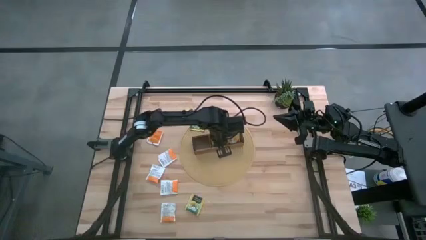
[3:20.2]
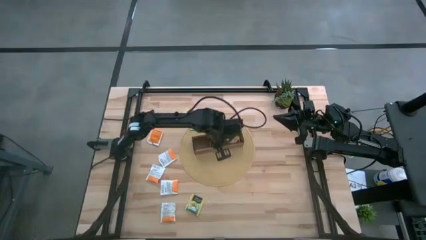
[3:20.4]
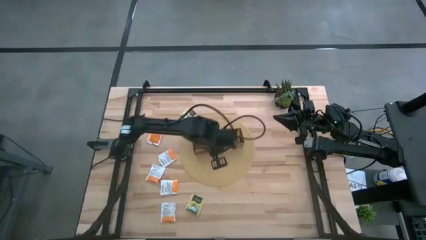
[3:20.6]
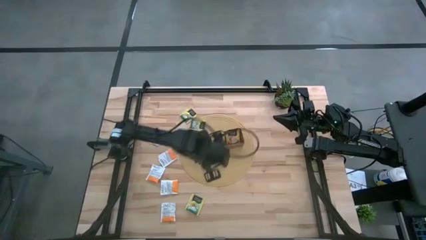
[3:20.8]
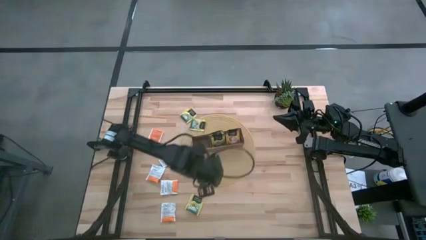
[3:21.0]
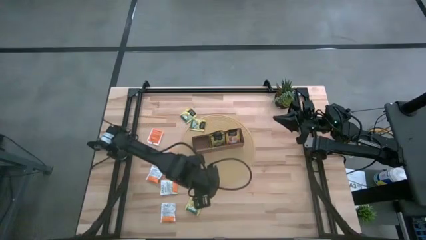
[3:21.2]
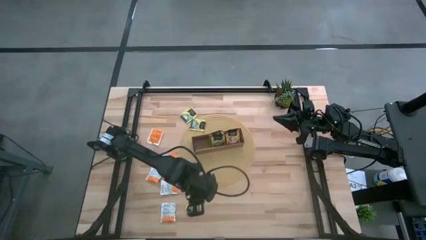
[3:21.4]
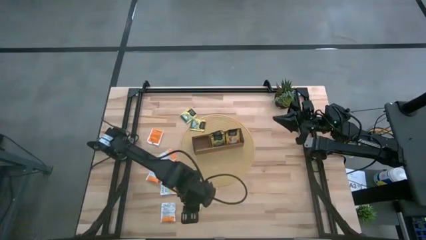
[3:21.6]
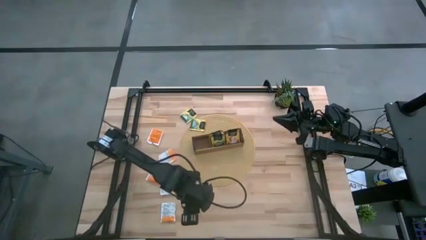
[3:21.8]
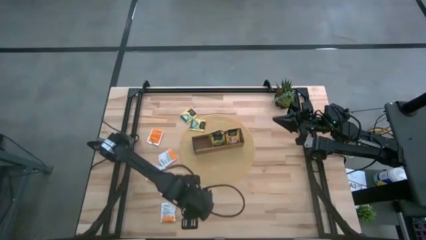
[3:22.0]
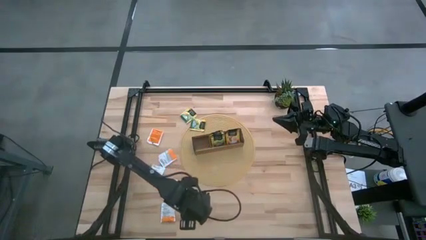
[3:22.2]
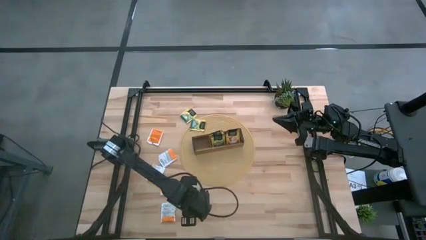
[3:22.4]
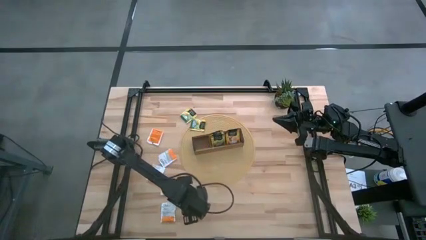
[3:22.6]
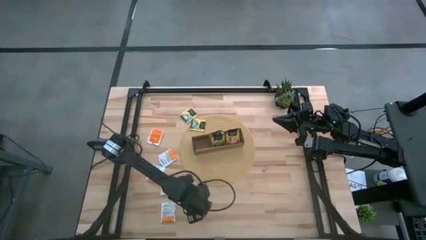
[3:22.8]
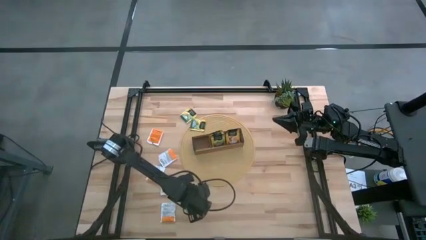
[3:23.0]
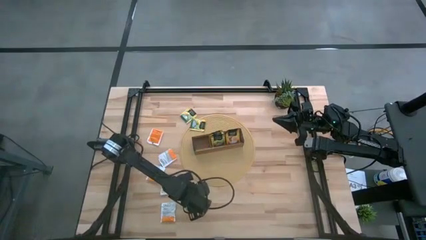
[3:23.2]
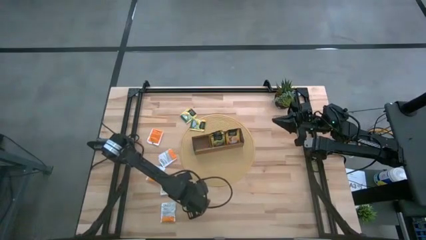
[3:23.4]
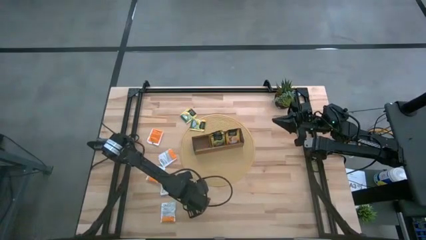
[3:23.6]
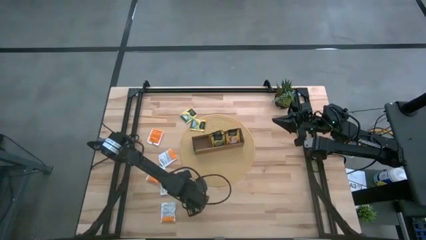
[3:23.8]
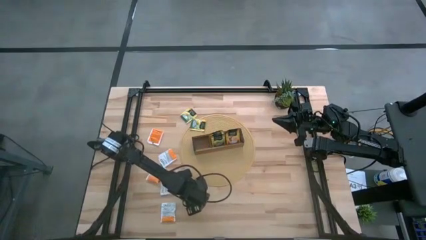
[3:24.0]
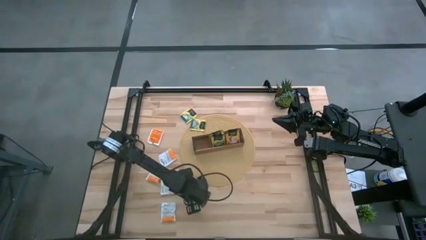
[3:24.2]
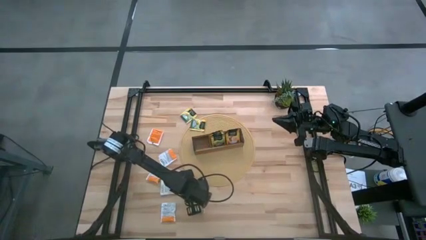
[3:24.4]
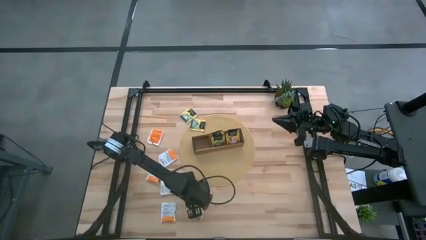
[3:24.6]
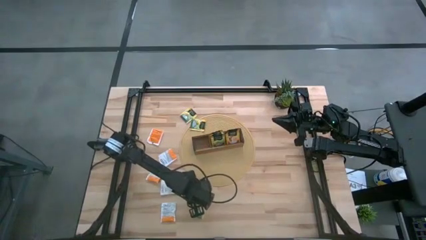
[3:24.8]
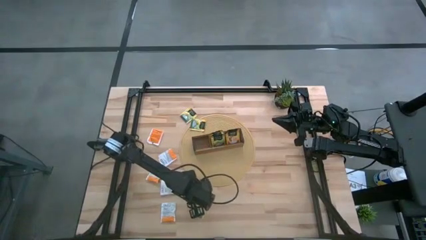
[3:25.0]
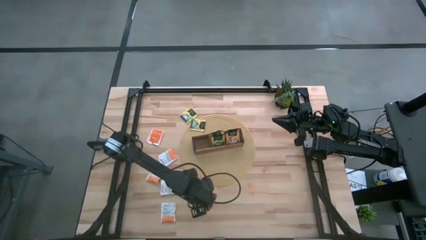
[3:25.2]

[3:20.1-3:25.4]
Task: Pick & Place Tea
Put the yellow tea bag into the middle section of the wooden organizer

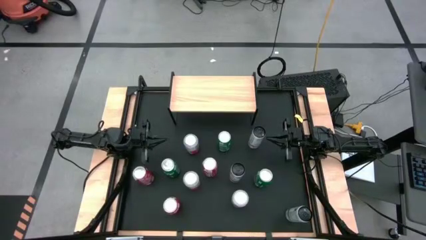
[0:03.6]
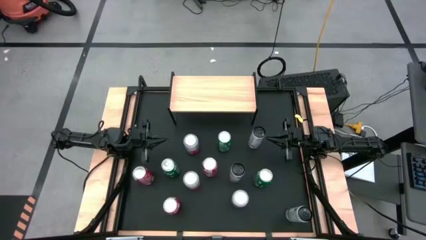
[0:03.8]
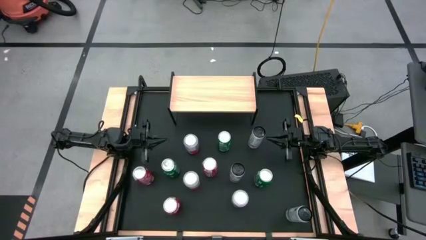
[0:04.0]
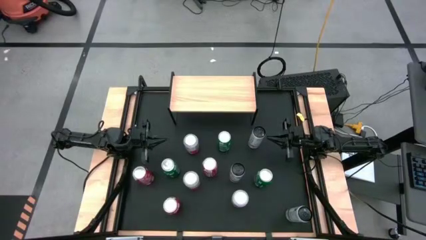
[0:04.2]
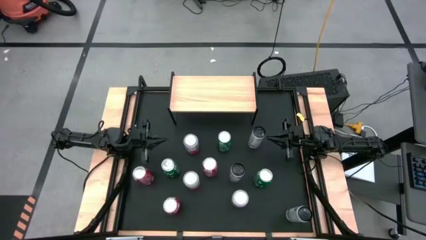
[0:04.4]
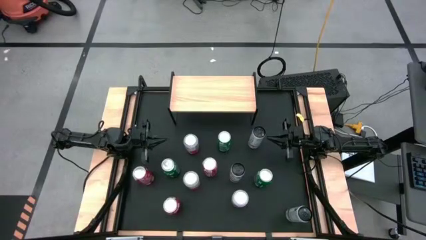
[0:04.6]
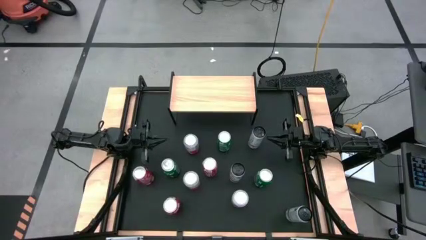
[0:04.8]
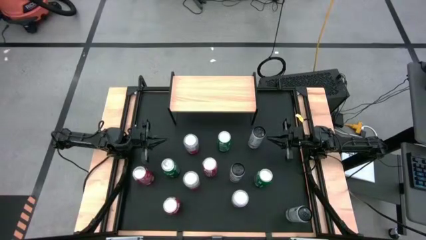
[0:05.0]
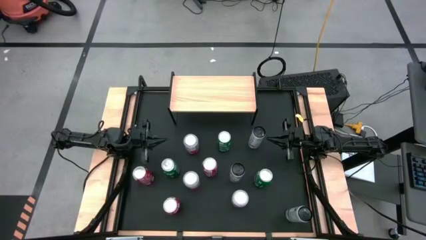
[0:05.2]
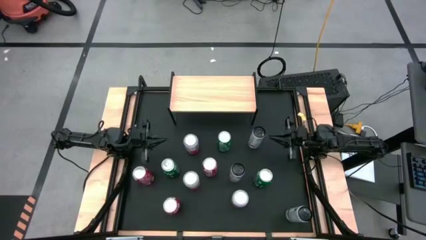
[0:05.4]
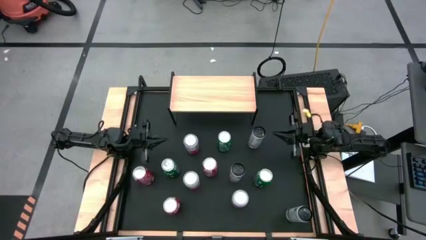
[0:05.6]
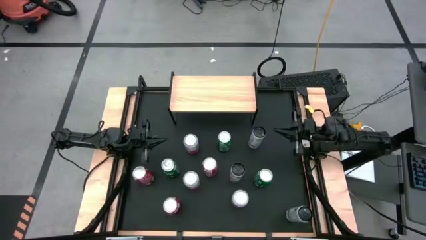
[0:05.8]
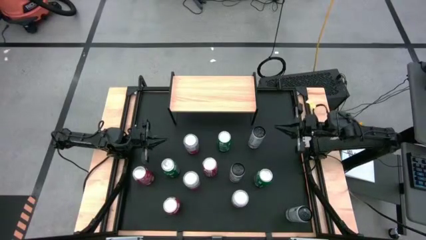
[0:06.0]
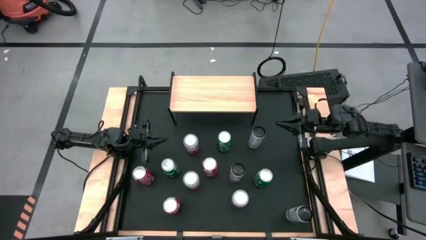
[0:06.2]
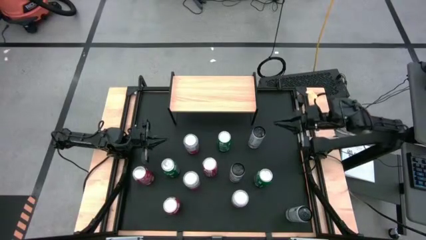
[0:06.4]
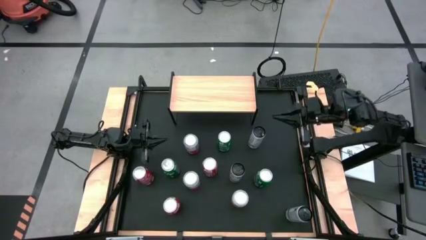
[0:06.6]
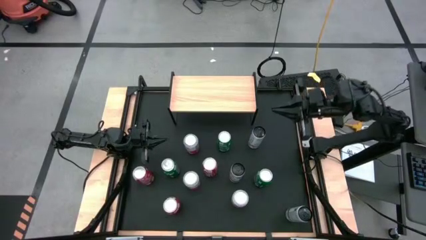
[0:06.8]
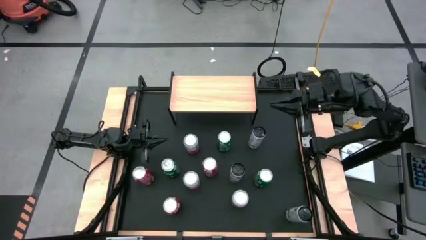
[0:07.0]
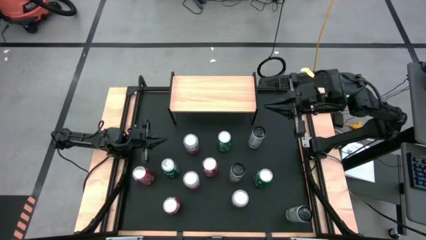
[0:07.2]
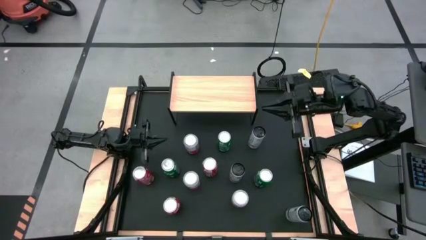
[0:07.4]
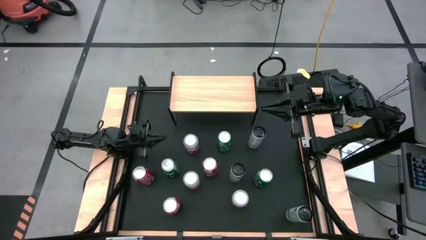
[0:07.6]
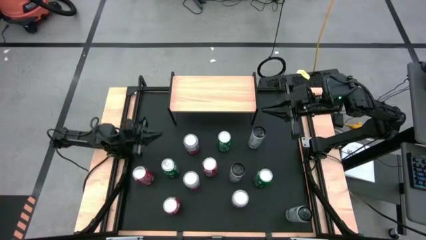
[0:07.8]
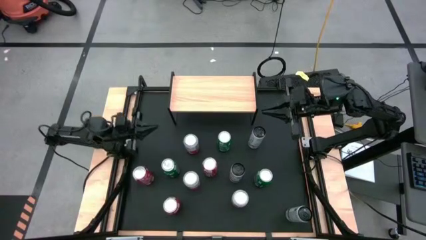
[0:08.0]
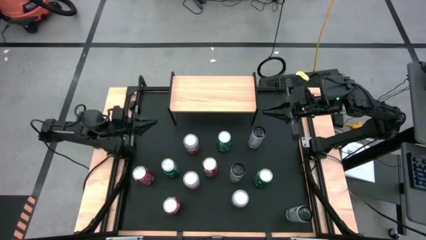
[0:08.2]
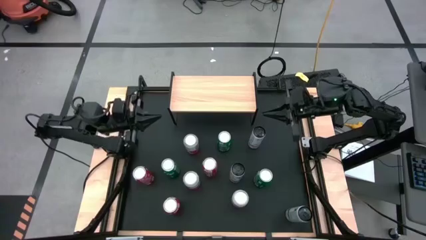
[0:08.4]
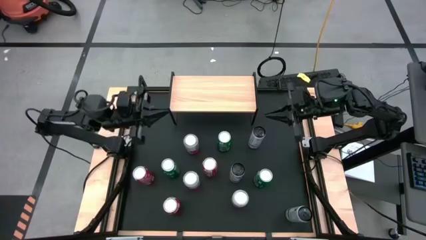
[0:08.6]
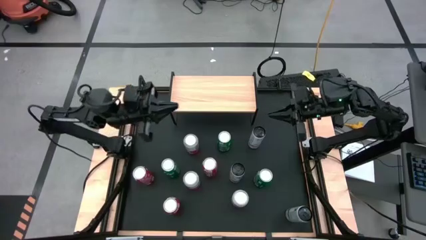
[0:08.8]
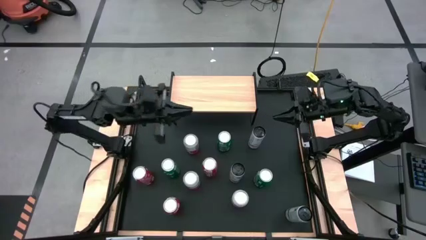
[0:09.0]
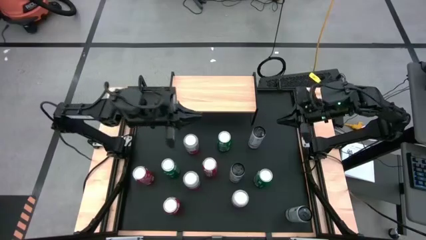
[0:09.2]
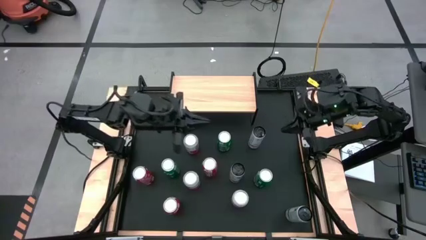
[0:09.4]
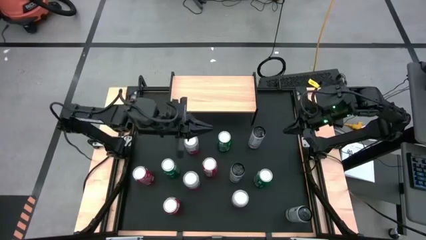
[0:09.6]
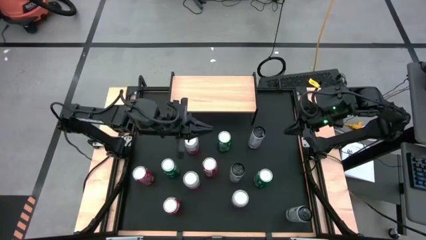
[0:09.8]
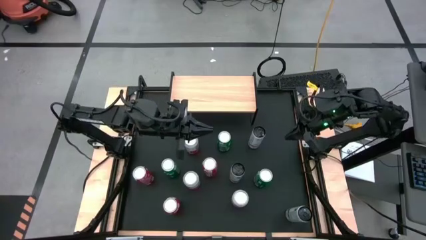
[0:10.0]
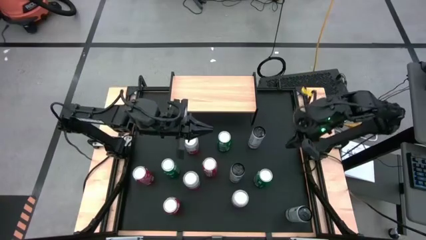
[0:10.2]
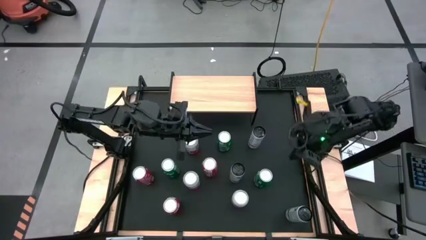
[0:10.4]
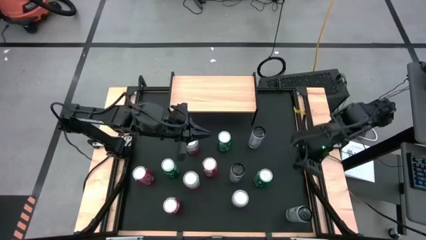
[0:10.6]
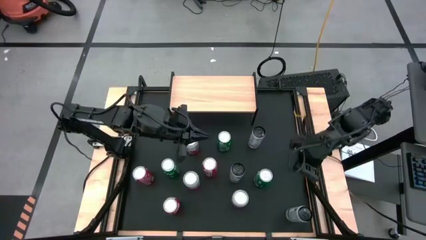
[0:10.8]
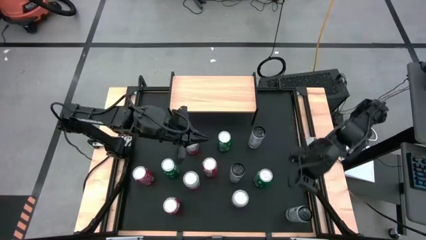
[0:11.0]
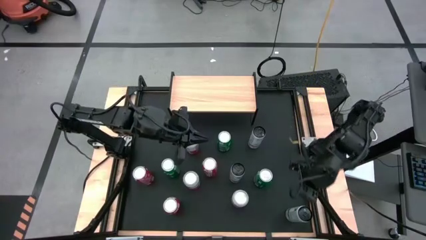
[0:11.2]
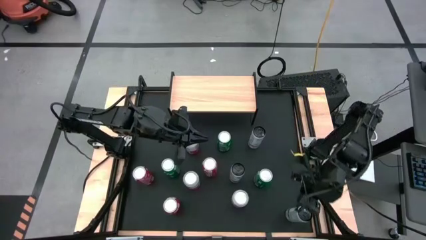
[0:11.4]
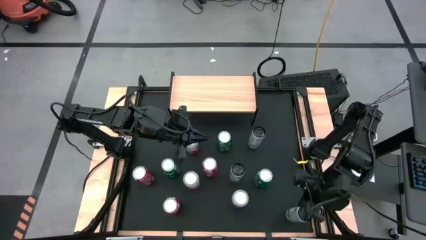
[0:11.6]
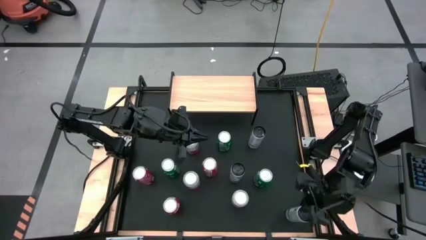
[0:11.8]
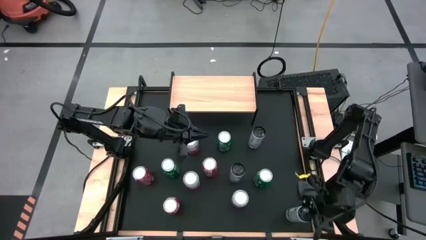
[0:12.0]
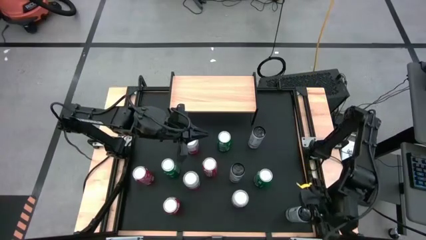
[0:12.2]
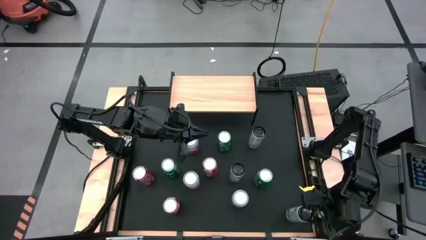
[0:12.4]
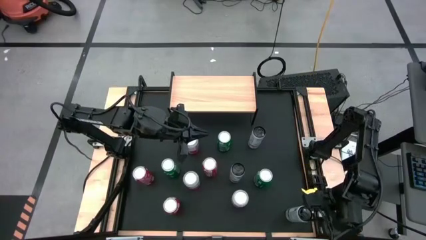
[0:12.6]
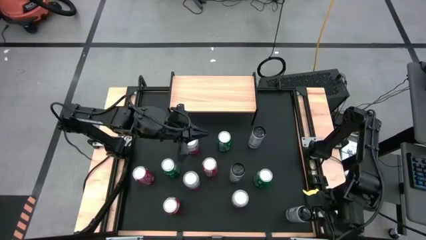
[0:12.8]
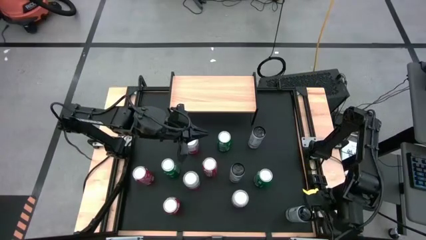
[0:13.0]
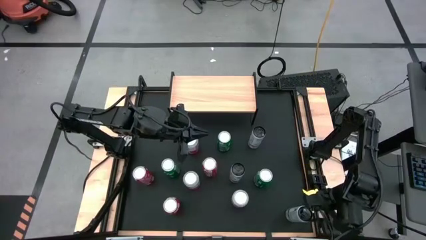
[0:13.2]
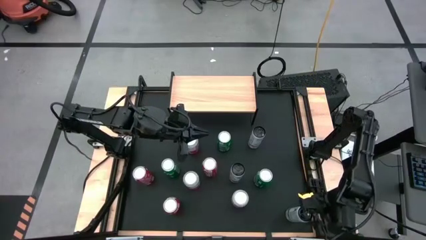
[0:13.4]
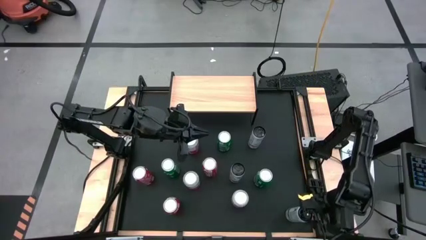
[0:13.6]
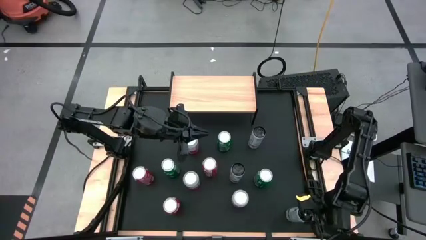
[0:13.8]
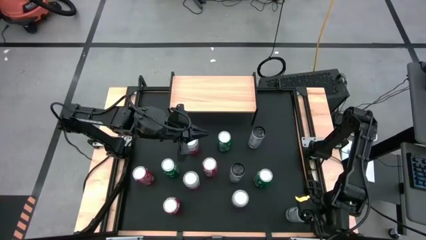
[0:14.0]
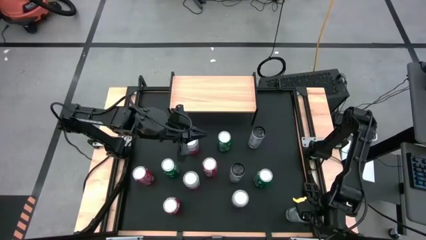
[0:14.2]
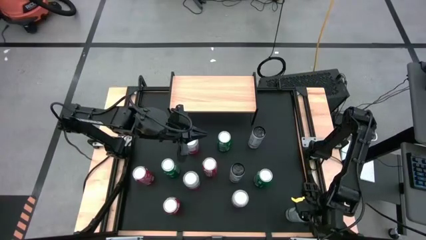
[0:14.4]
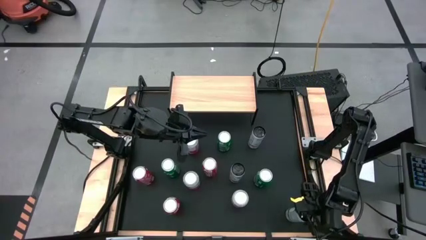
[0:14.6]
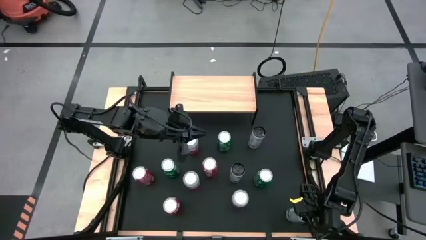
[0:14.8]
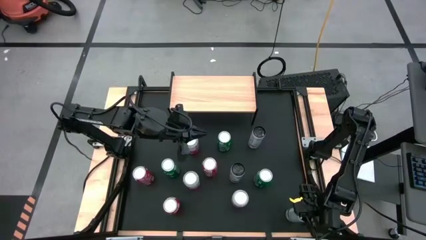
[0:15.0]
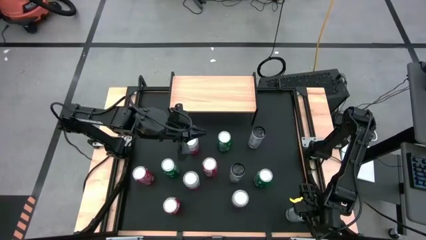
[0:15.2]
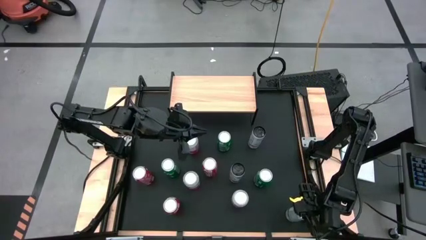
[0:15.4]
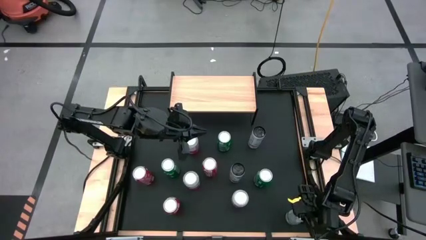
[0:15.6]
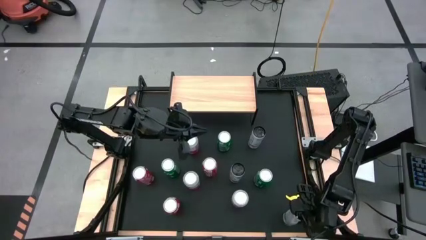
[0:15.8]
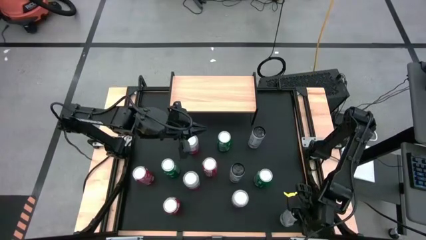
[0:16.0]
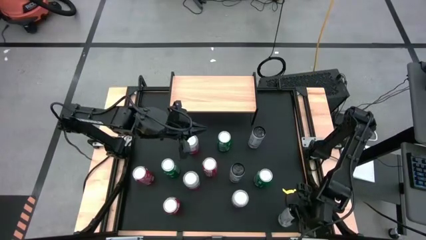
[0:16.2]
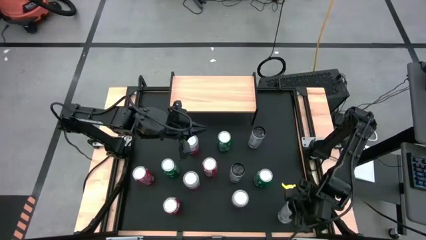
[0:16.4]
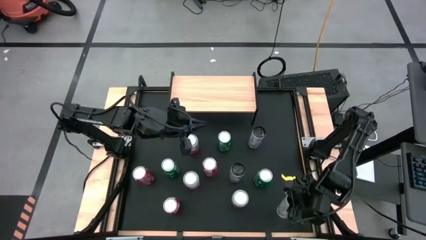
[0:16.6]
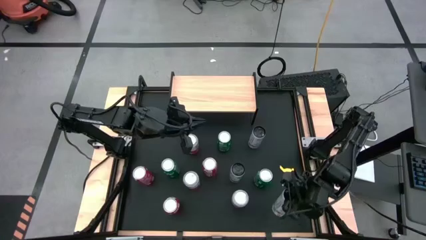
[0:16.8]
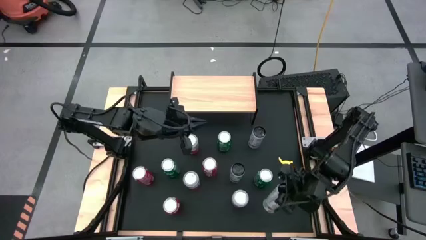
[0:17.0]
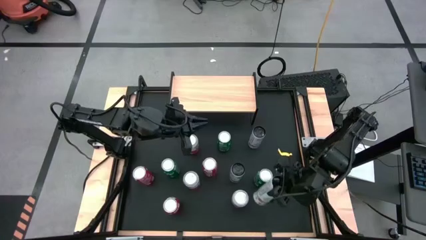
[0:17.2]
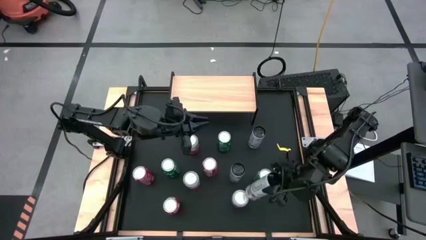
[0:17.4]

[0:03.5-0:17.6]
Task: Place canned beverage on shelf
Put the bottom right white pink soda can on the shelf
